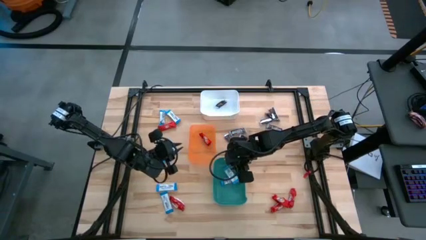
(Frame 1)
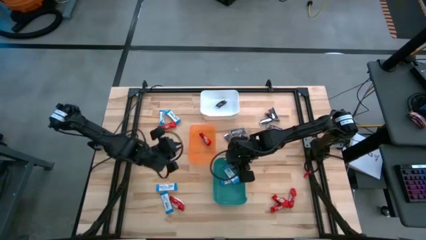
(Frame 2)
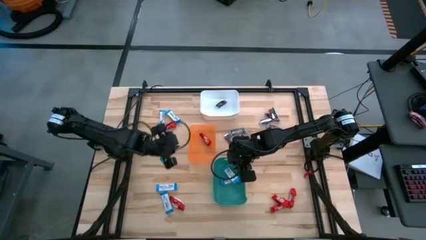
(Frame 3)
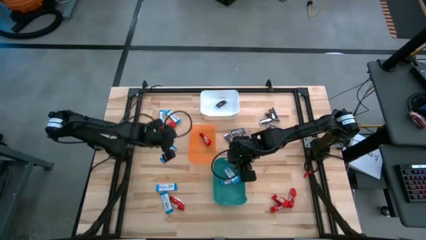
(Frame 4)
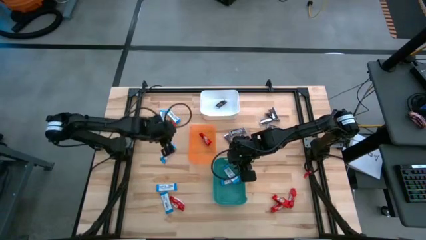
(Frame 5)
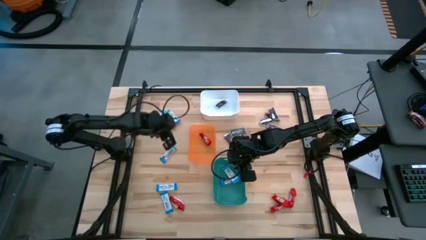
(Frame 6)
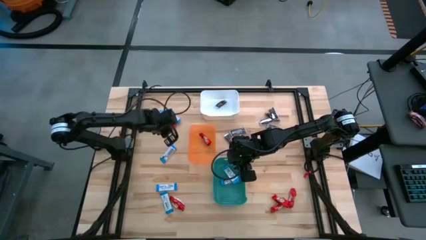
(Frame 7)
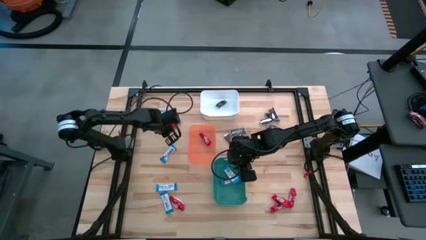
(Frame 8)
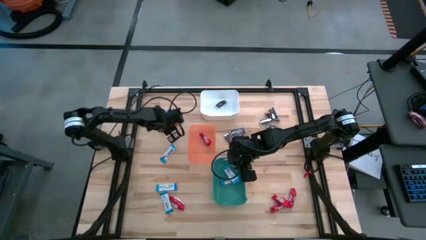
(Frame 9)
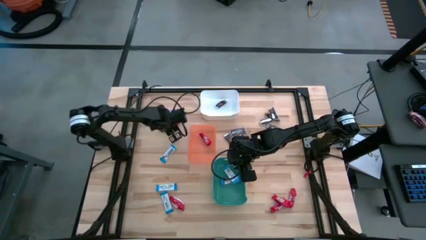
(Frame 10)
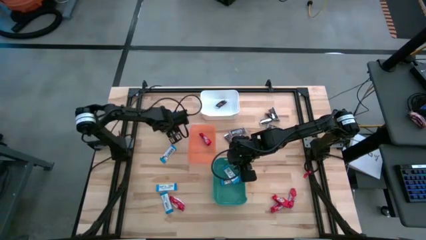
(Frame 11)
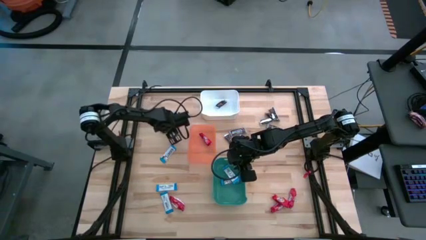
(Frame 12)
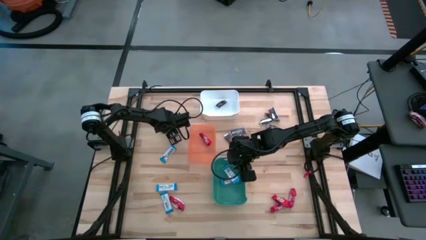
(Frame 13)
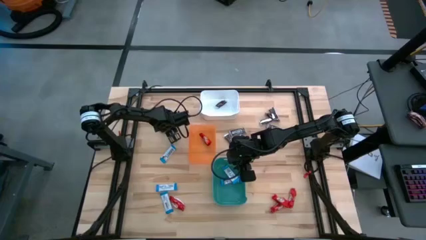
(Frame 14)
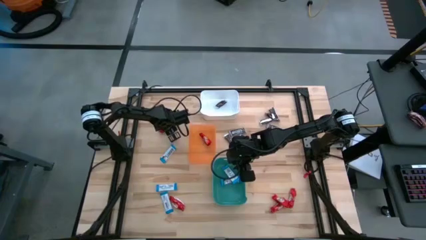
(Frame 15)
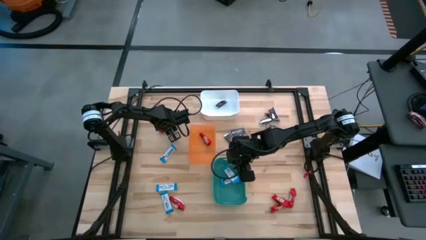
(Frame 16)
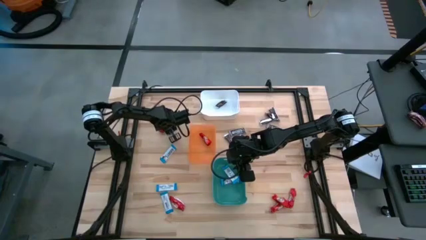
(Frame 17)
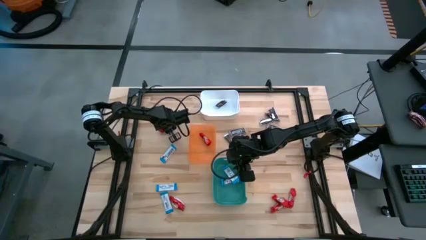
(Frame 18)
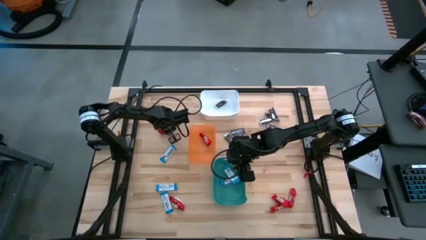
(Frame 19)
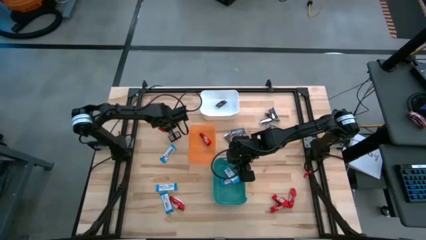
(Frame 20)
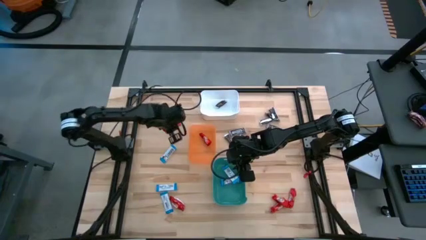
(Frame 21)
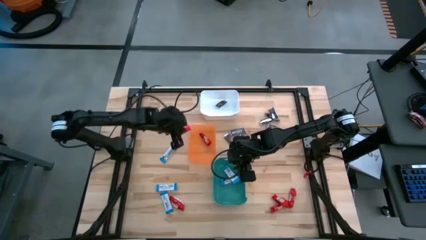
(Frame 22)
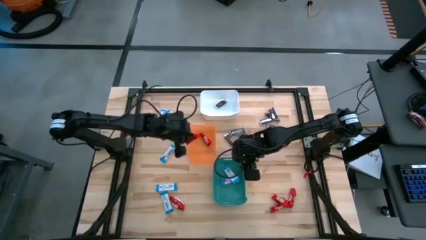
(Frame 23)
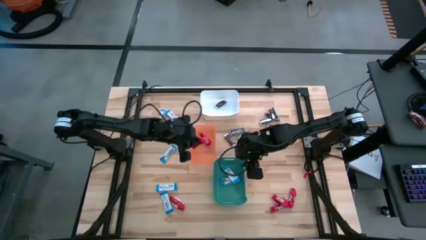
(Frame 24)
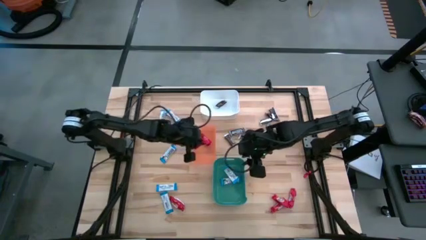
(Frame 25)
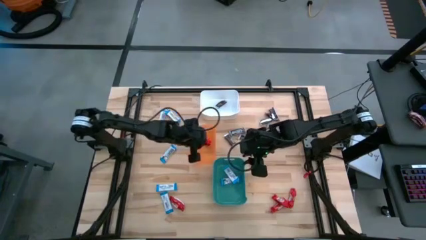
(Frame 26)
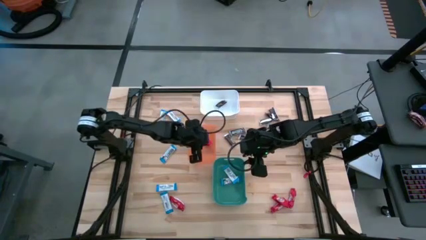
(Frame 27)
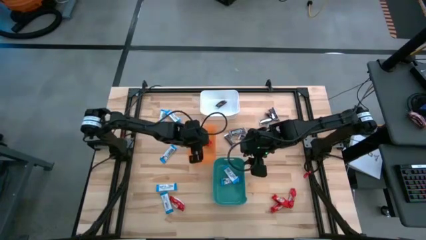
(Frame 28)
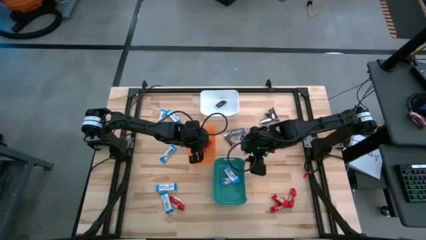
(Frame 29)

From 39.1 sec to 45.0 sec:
Task: Sort candy
Put the red chocolate bar into the orange bin

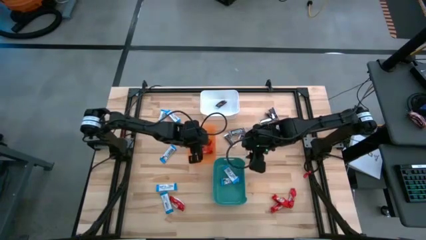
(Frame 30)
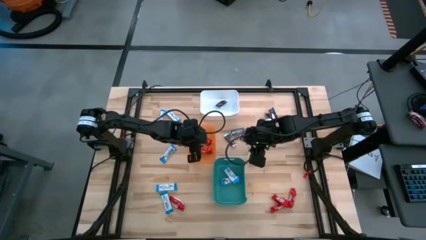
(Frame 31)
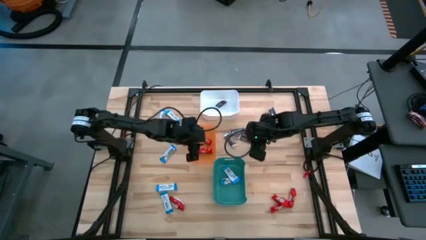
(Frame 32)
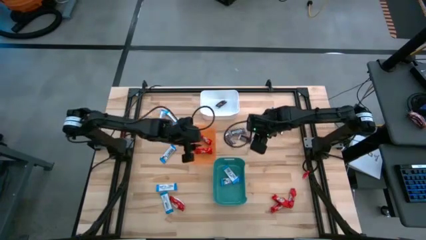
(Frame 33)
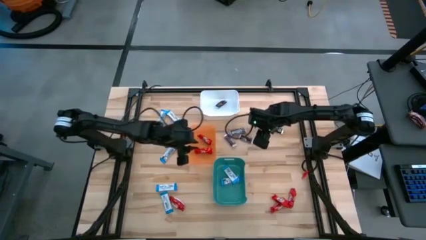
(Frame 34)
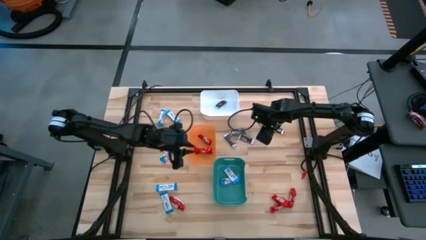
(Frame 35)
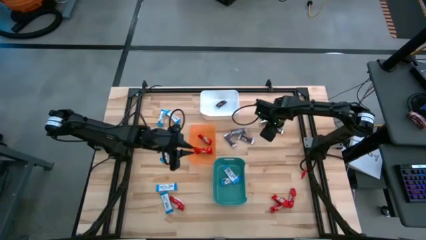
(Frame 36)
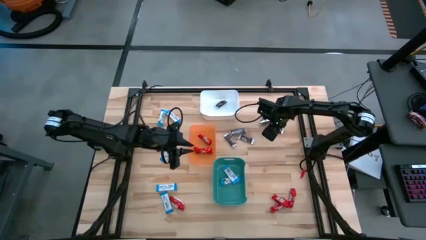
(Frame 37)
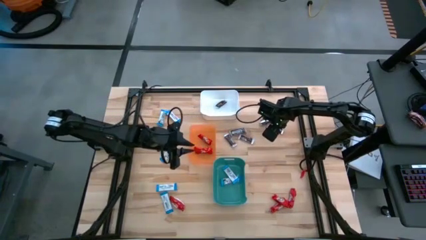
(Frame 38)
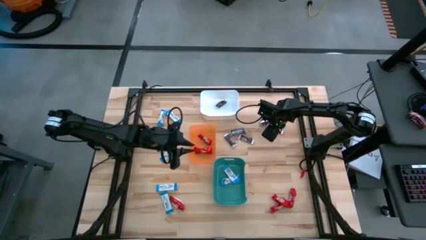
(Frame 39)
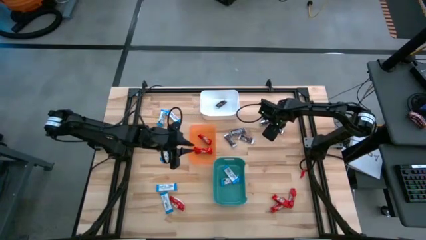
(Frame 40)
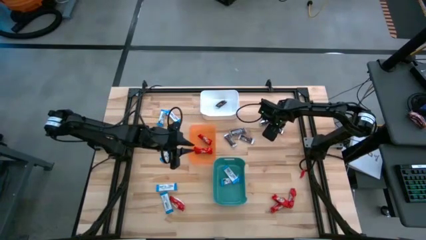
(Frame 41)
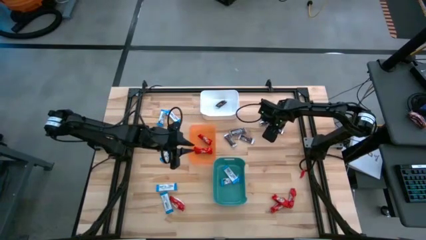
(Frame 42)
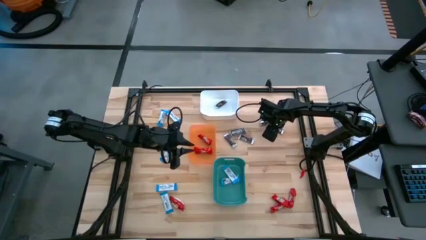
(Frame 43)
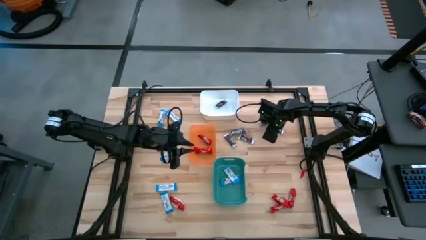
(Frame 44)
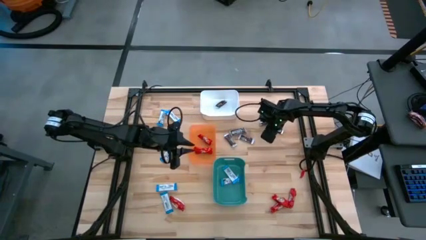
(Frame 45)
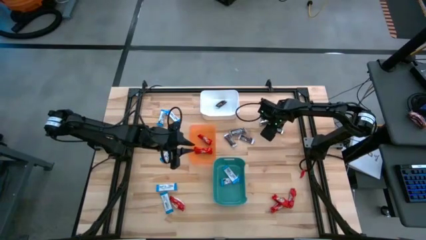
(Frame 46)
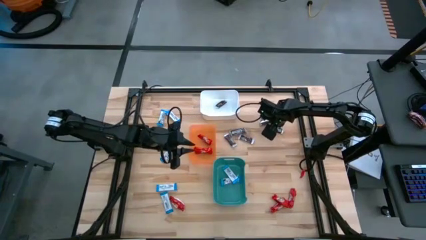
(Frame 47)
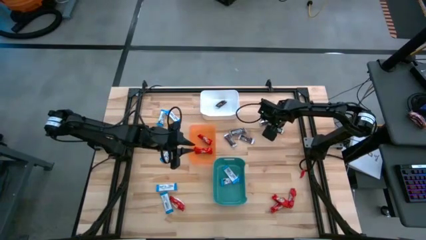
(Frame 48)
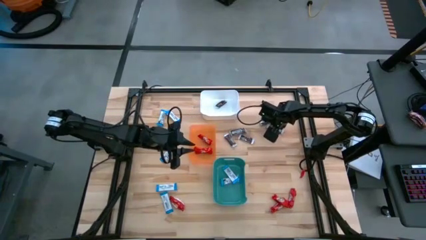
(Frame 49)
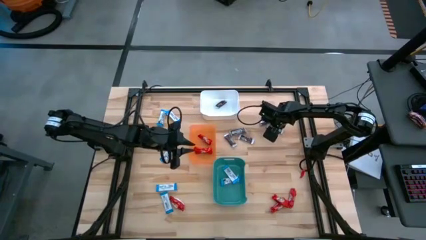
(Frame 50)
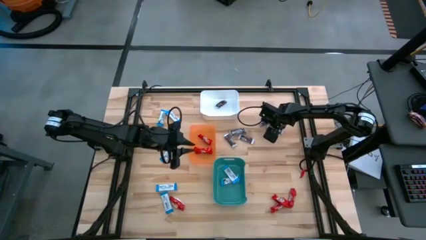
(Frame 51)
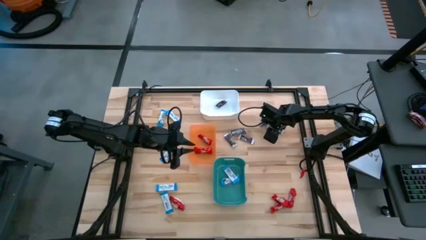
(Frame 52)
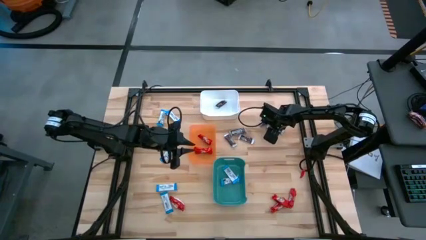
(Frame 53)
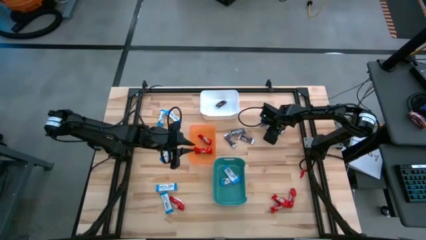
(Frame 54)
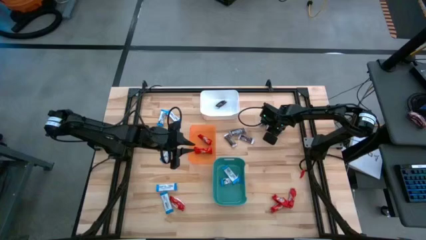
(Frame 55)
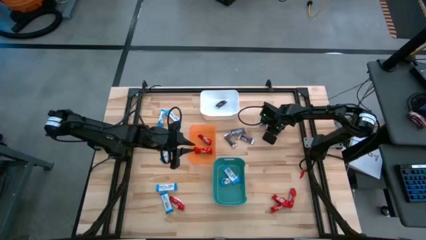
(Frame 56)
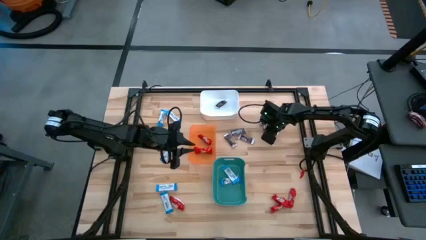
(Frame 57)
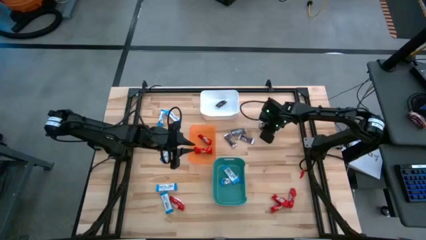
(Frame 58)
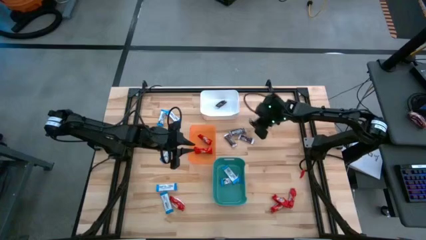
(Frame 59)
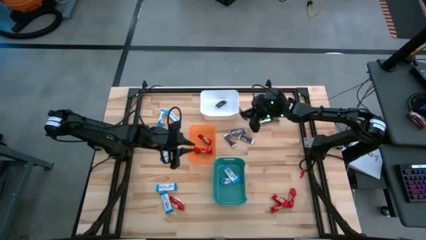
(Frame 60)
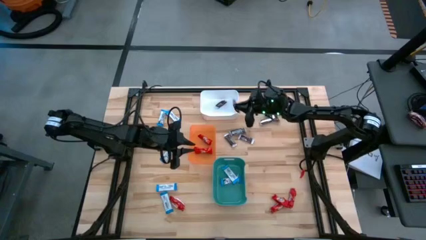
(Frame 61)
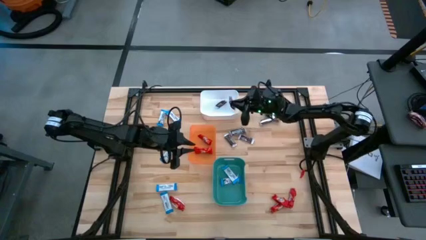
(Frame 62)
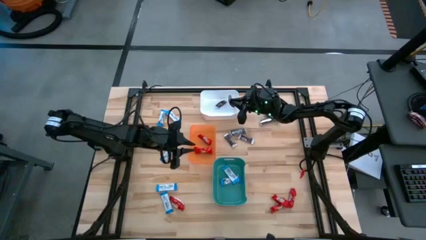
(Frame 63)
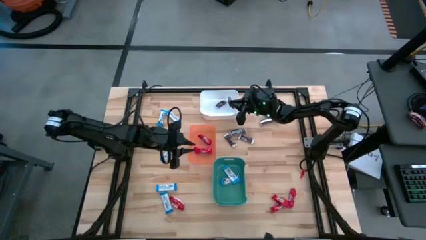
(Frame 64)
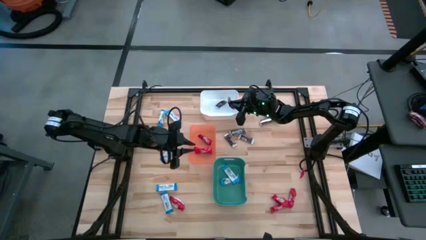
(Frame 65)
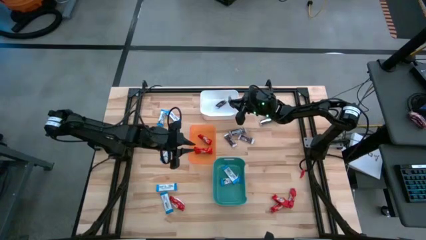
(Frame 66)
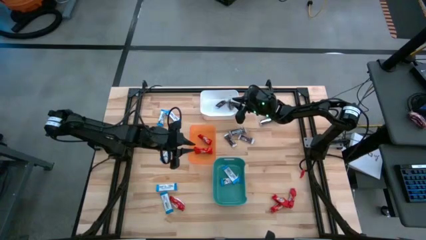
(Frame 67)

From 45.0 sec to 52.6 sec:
Put the brown chocolate bar into the white bin

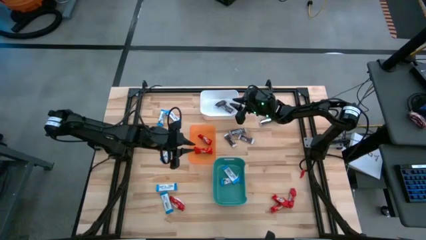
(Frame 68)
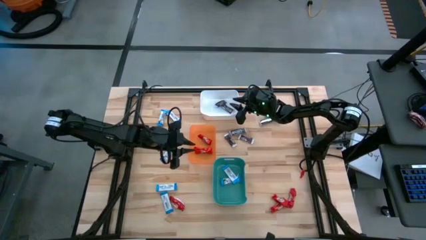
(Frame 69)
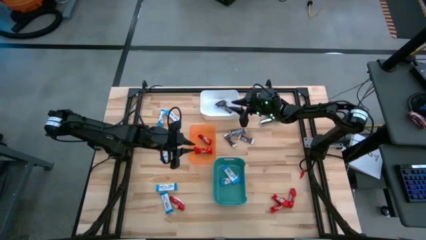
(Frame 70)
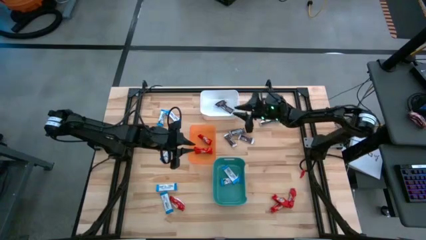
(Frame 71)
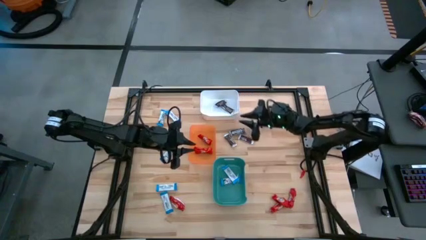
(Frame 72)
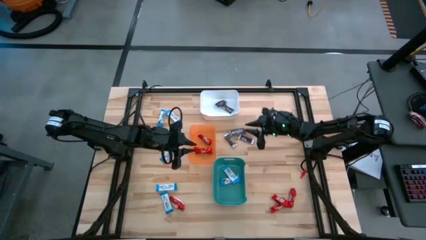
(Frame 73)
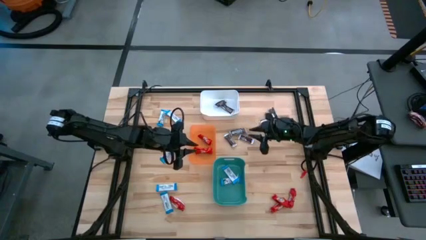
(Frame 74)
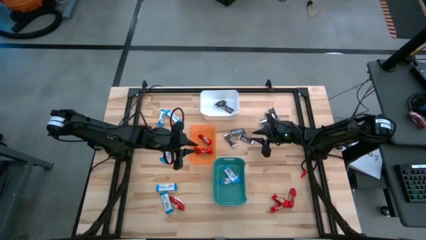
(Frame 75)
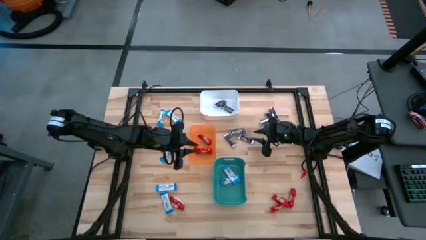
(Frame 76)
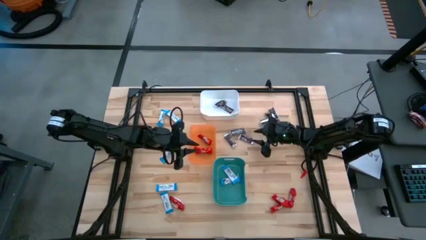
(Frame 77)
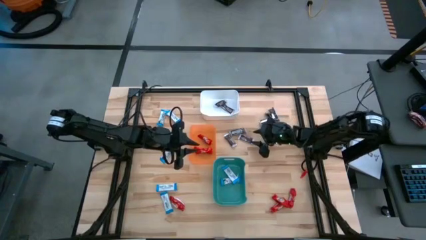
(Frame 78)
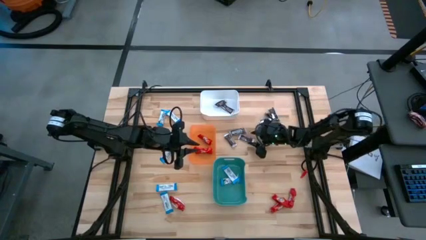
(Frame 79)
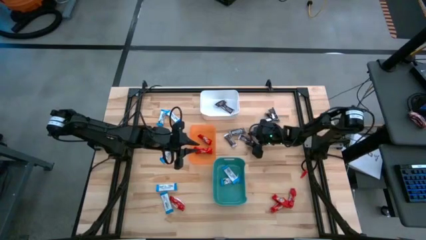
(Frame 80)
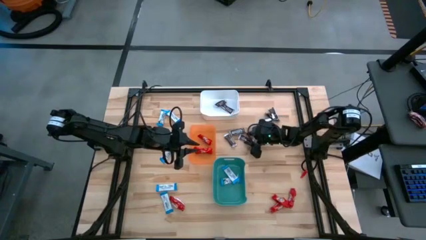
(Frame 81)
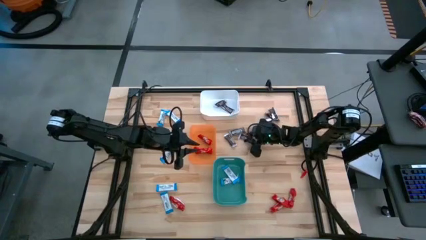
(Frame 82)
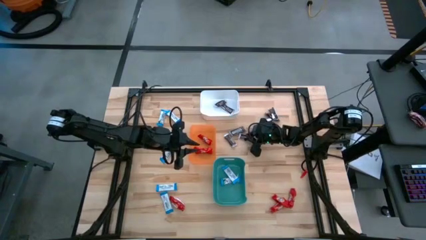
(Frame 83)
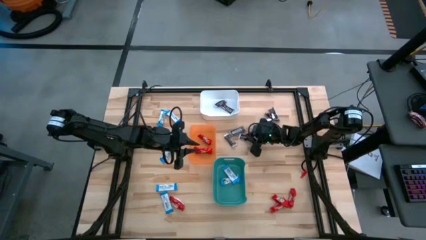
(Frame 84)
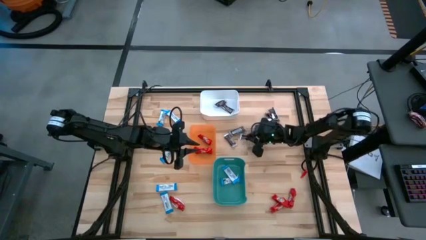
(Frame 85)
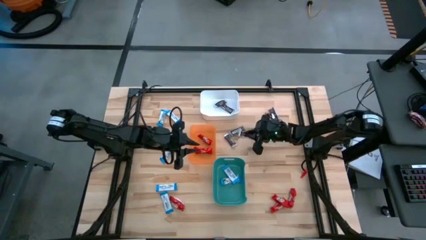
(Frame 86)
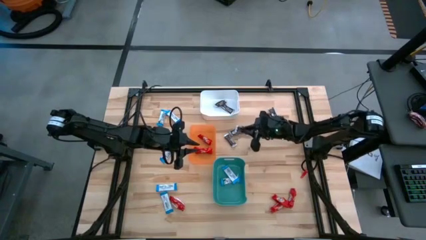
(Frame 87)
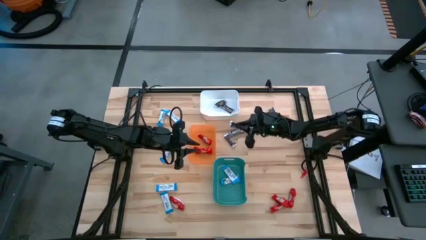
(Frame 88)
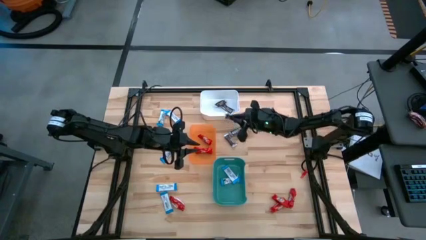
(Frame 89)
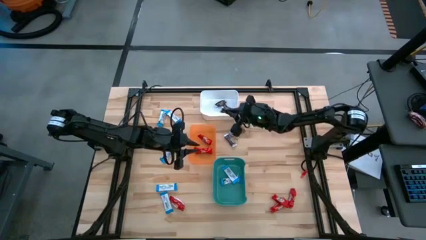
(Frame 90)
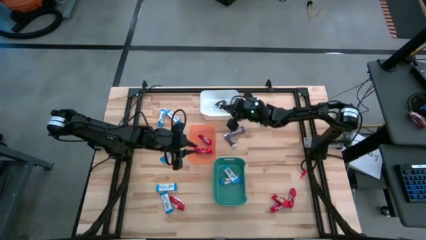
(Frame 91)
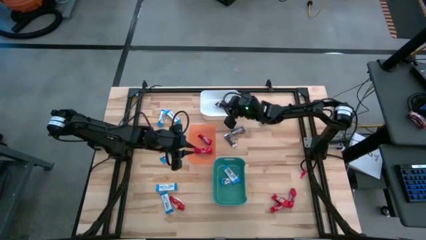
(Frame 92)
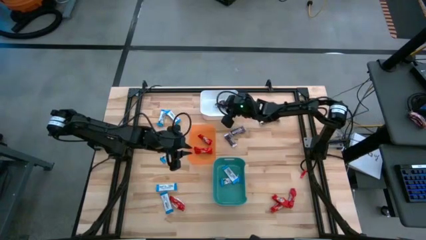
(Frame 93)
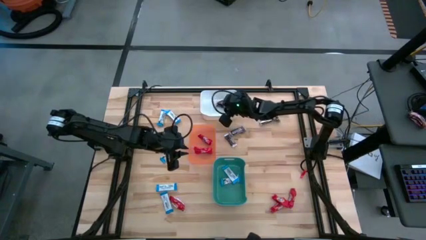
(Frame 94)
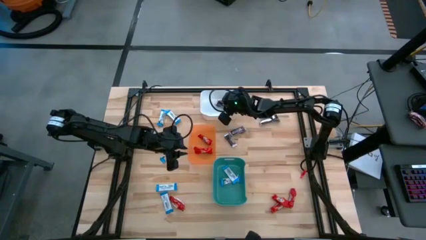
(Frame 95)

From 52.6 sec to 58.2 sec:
Put the brown chocolate bar into the white bin
